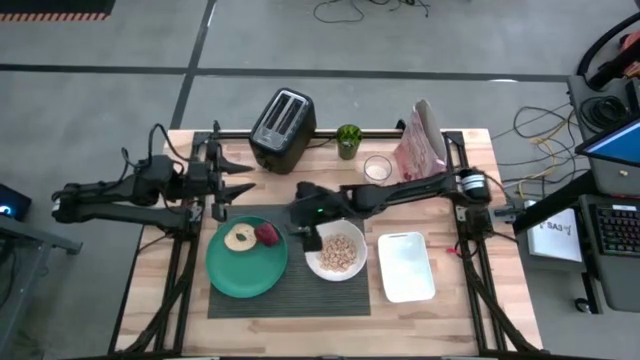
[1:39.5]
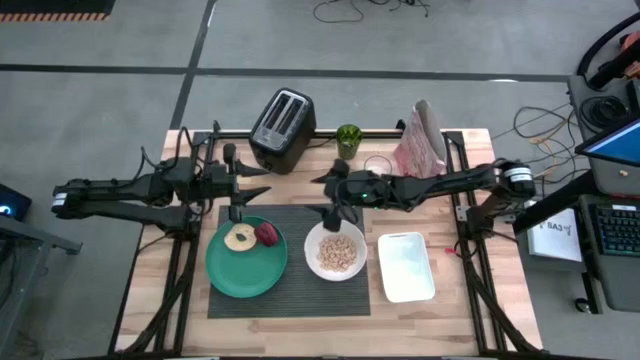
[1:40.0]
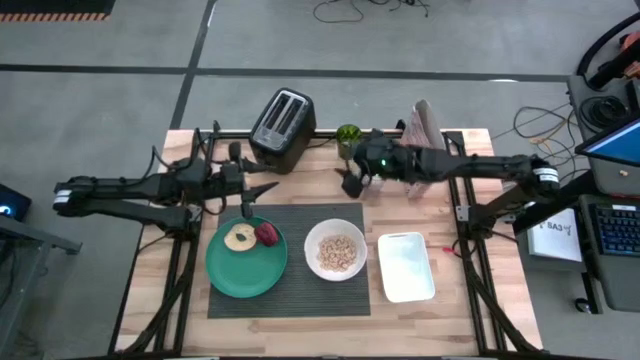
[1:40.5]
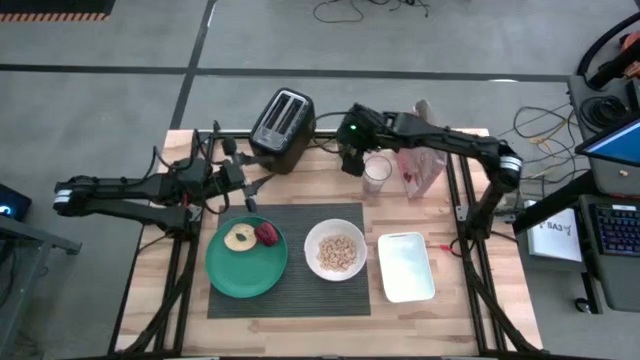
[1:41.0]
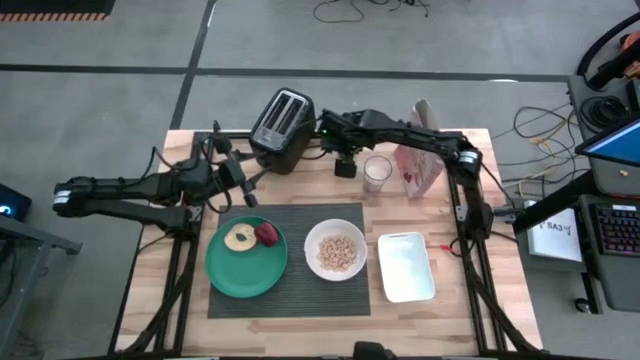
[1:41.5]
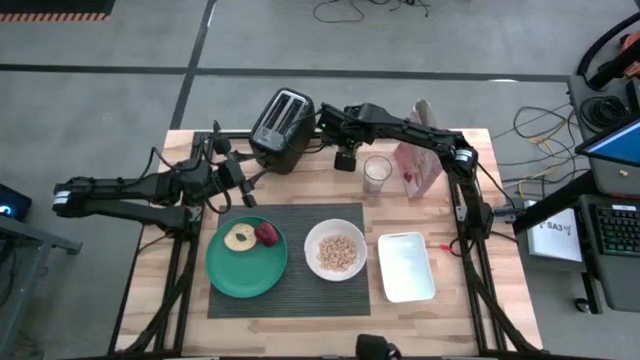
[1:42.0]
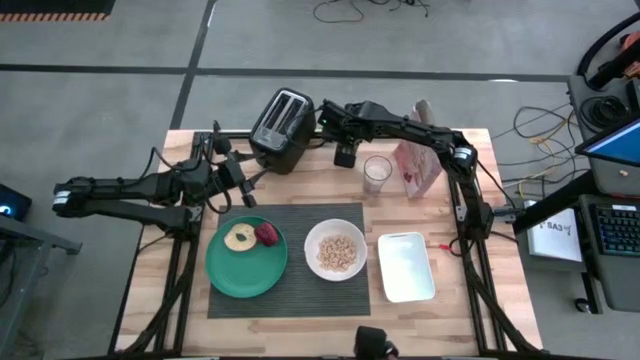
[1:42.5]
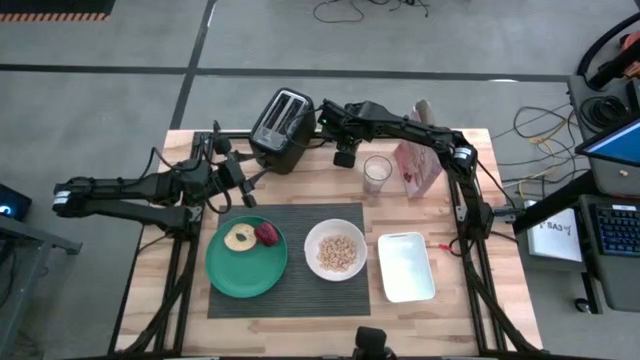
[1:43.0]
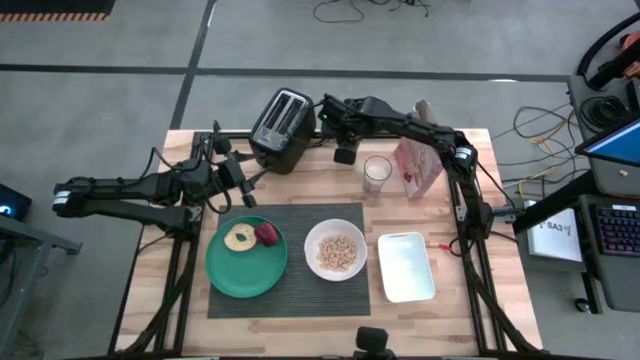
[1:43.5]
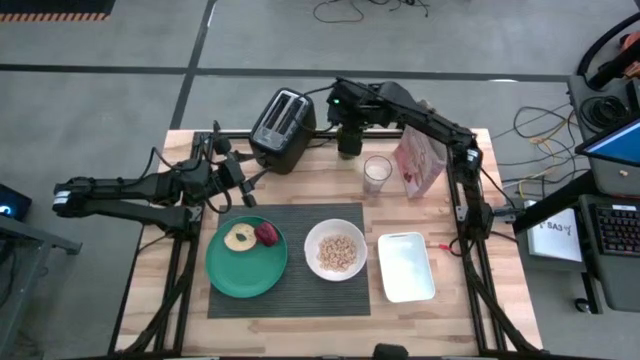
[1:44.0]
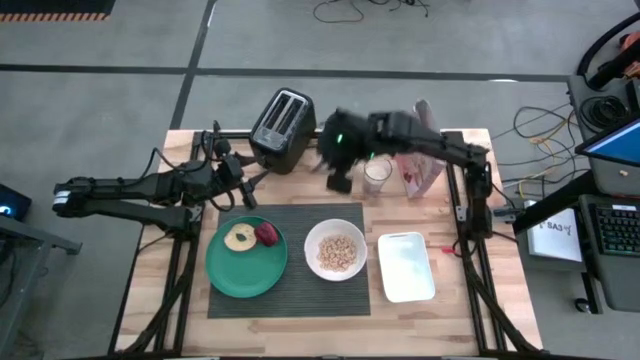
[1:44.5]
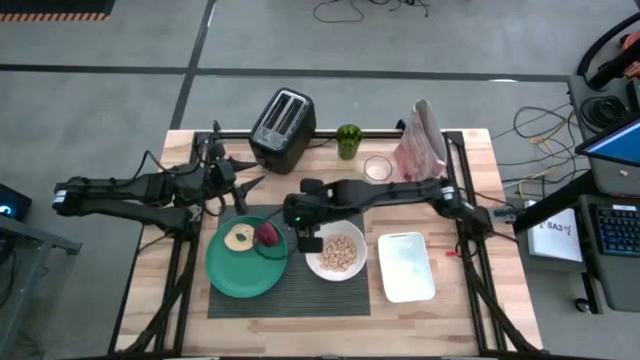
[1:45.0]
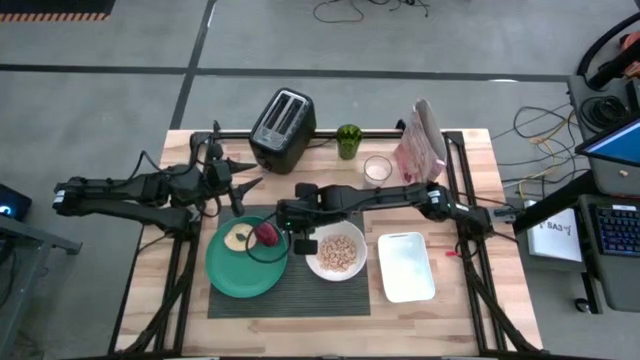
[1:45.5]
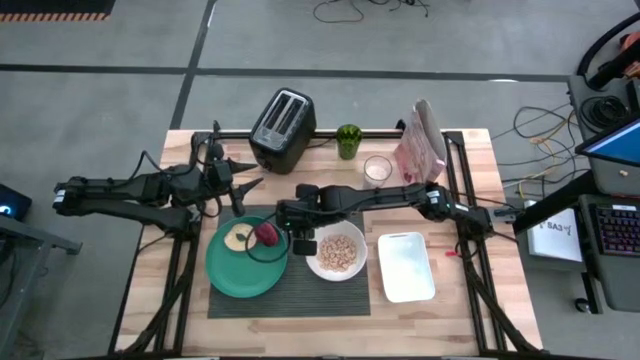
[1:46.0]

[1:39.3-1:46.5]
Task: Arrange a breakfast setting
Put the spoon on the tablemat to the right of the green plate

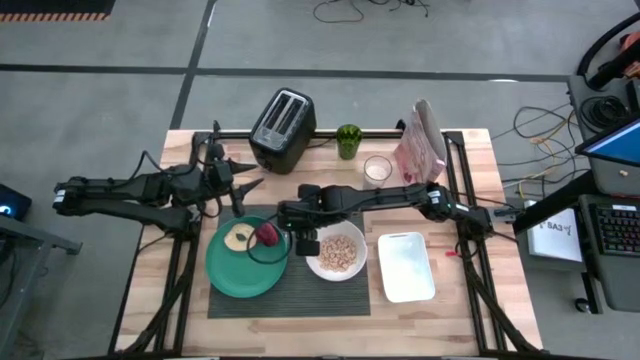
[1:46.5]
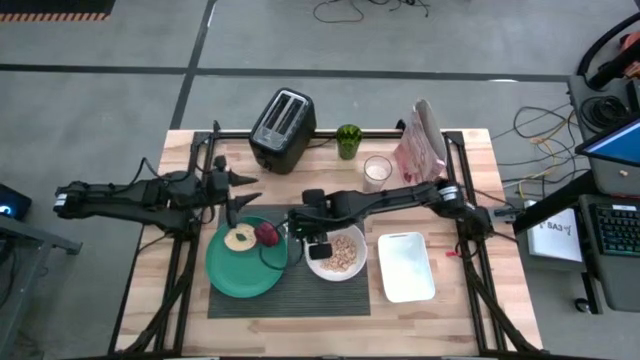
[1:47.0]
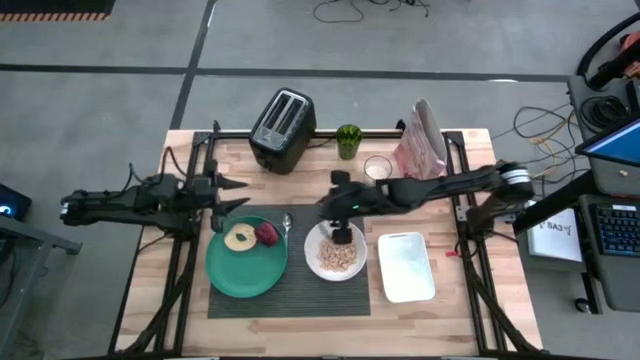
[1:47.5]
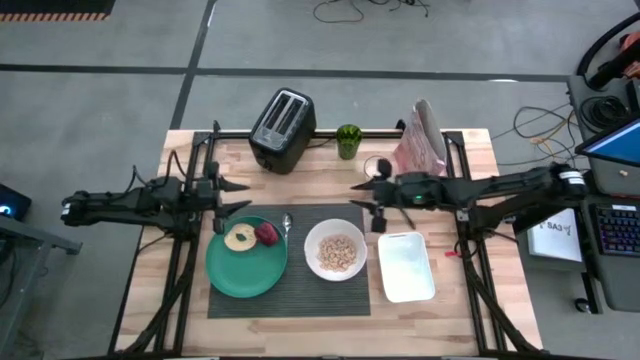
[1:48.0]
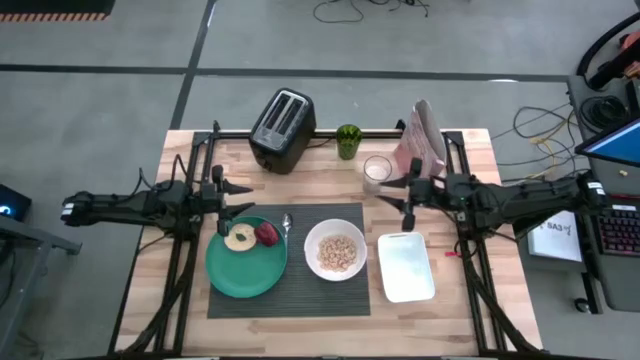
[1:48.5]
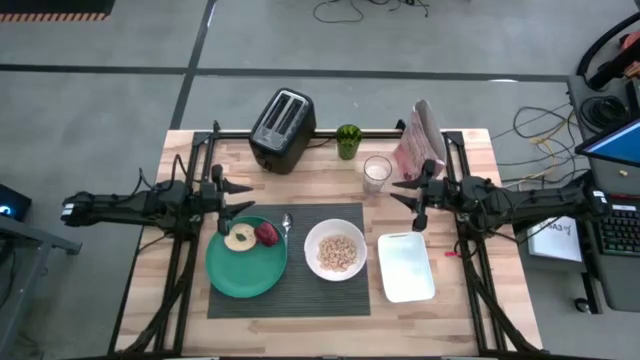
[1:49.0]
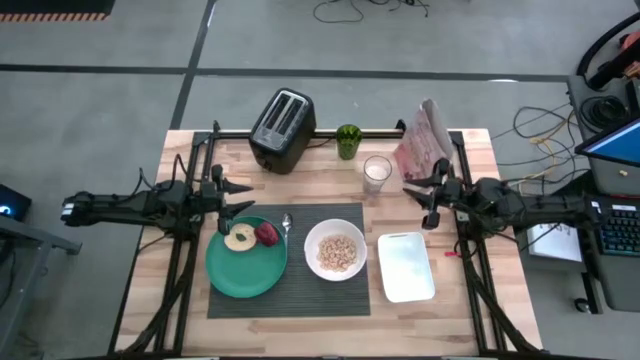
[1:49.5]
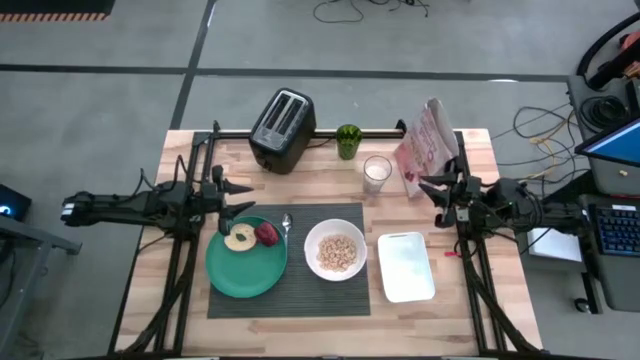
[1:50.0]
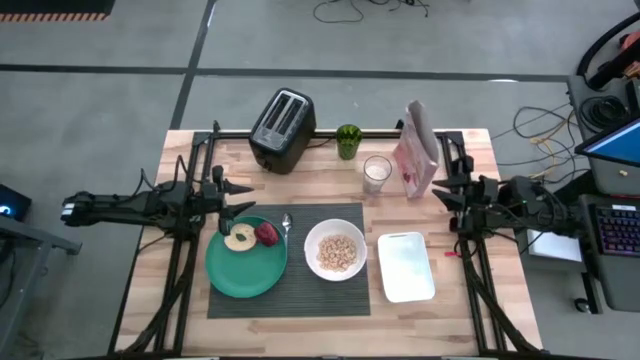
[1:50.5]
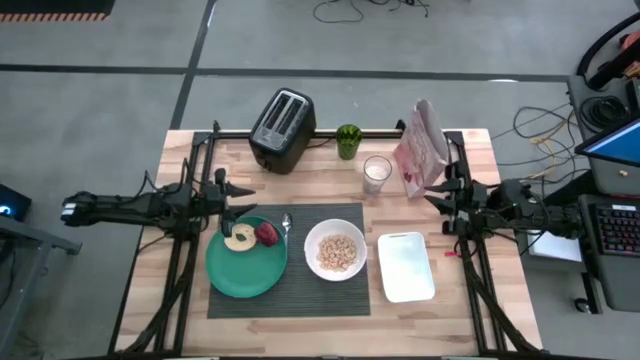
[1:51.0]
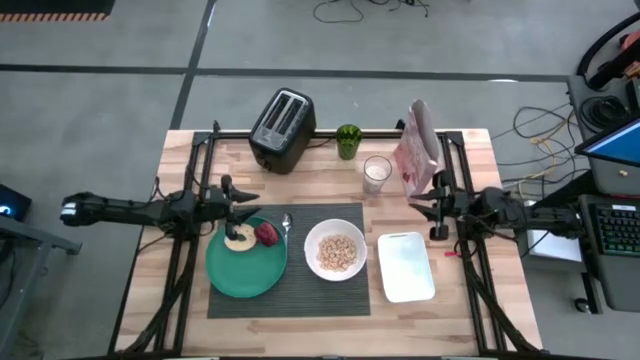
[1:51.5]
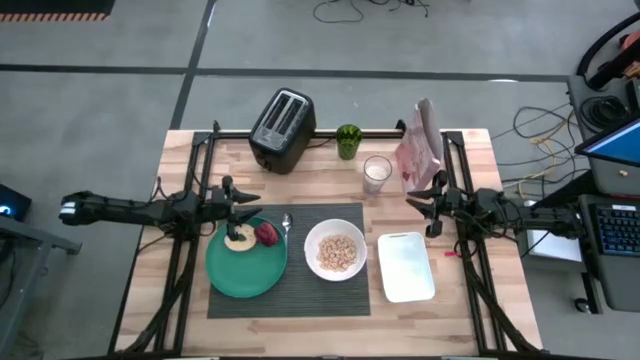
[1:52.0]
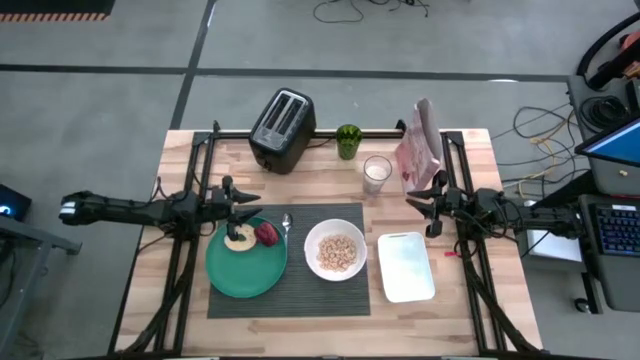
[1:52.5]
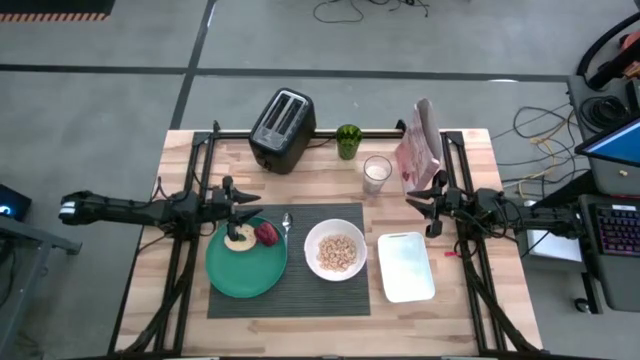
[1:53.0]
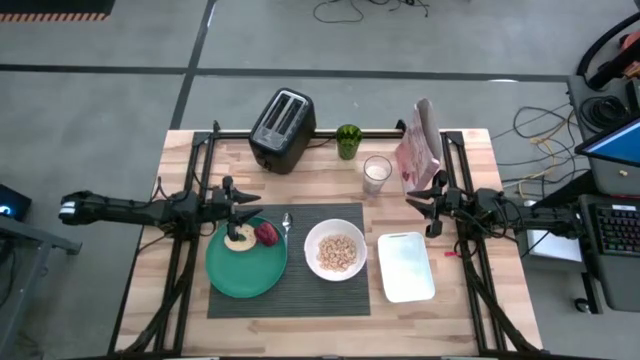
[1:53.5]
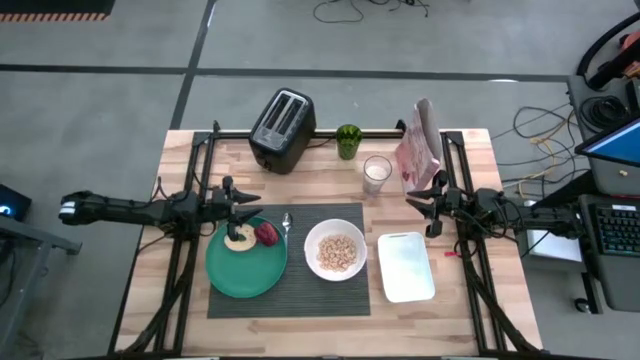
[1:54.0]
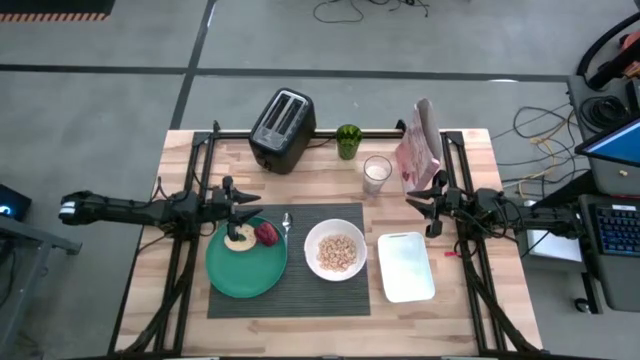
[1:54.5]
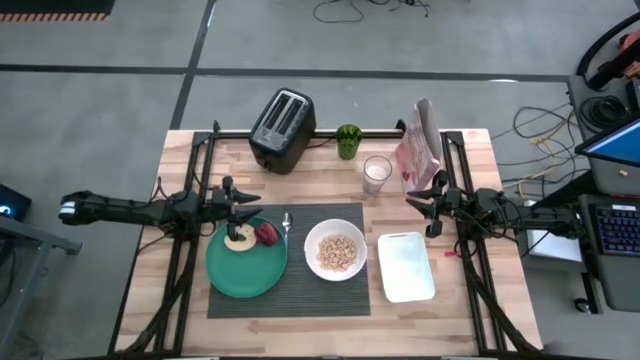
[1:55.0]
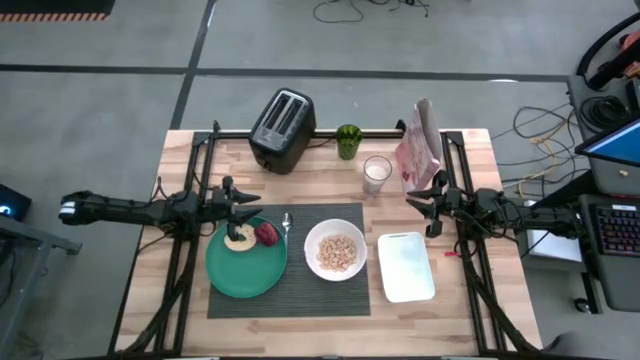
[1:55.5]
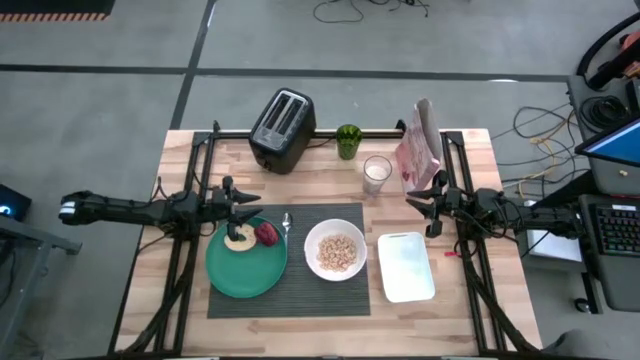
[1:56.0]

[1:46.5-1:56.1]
Return to Home Position

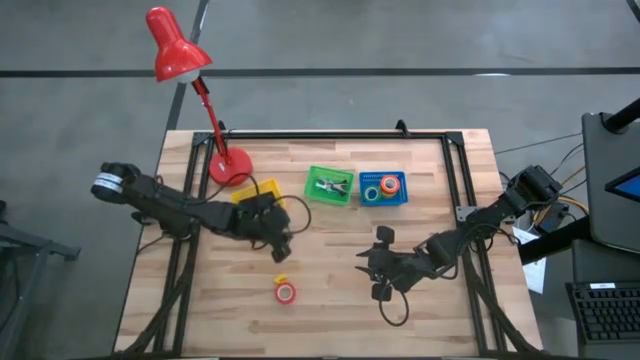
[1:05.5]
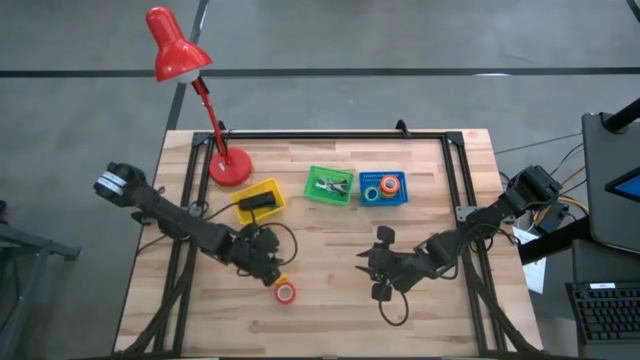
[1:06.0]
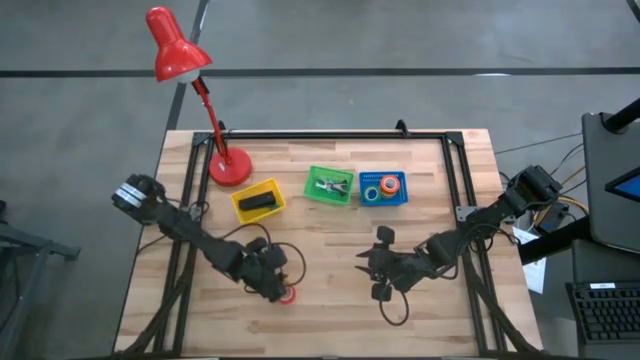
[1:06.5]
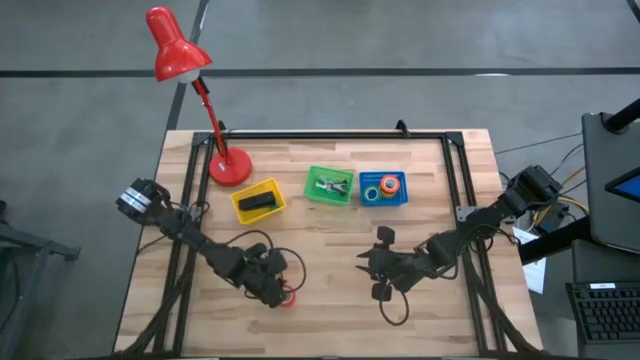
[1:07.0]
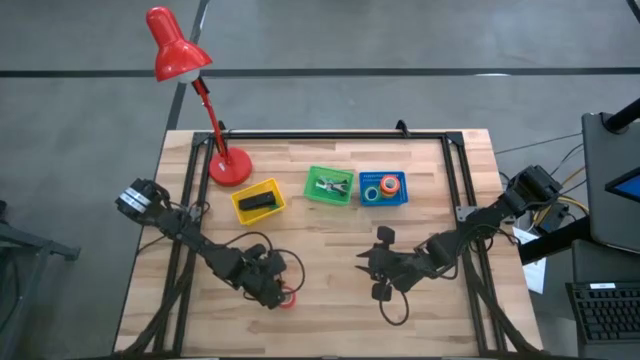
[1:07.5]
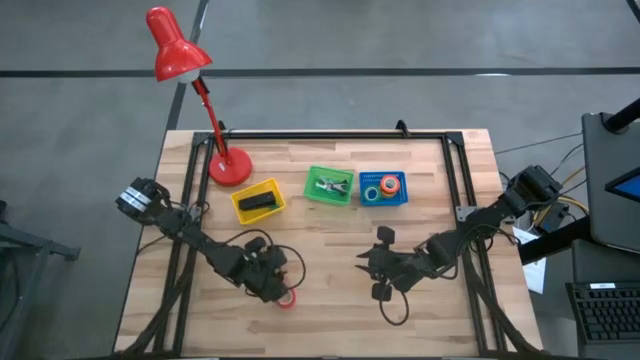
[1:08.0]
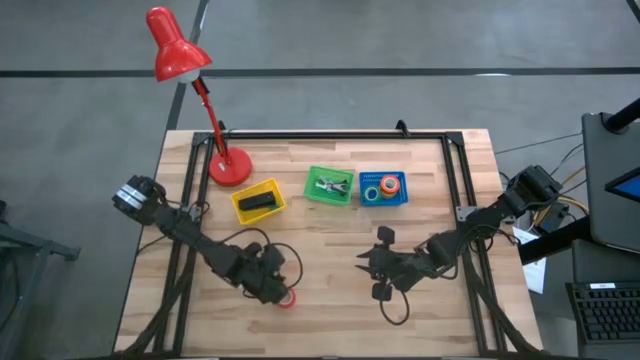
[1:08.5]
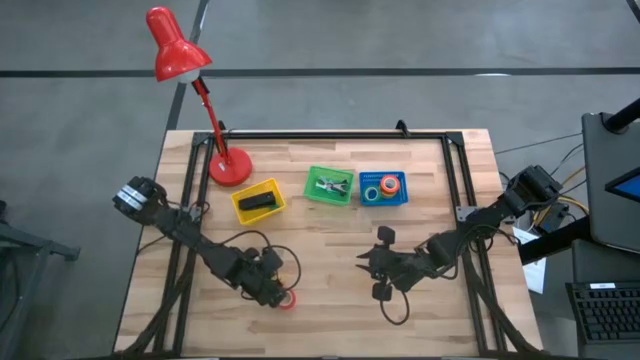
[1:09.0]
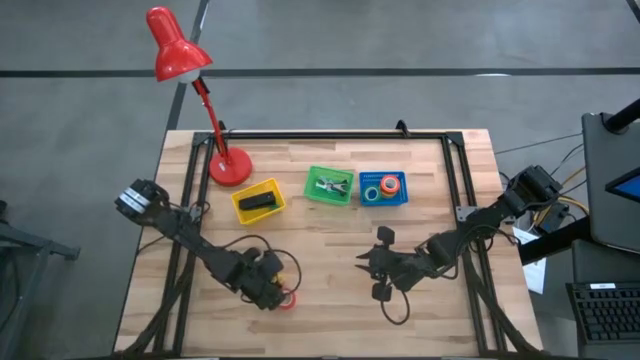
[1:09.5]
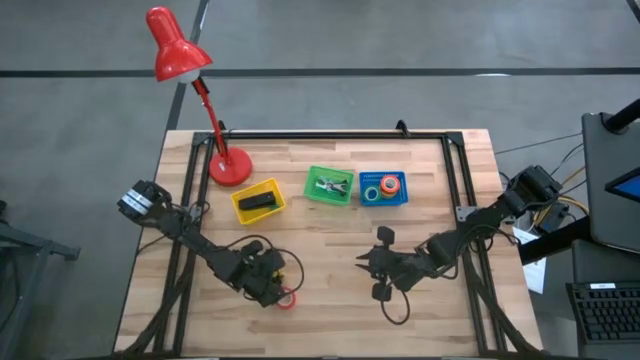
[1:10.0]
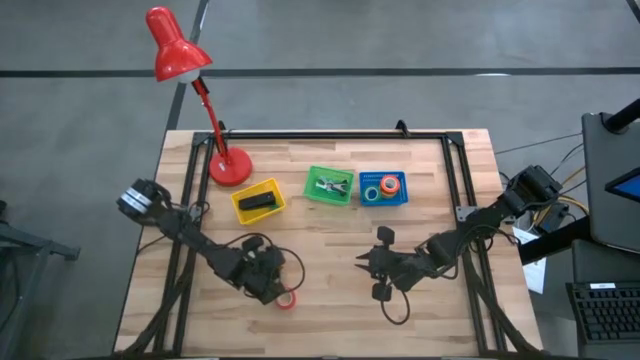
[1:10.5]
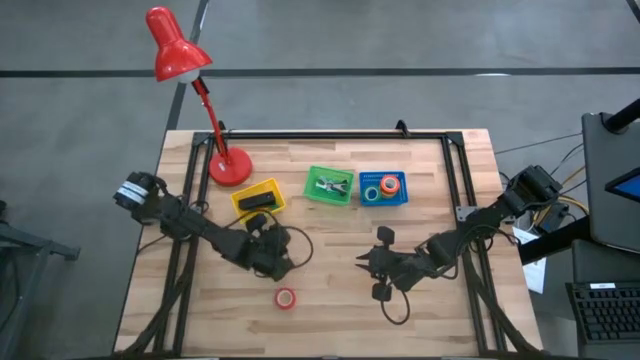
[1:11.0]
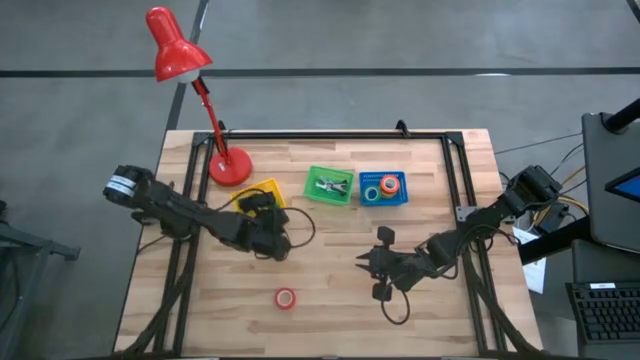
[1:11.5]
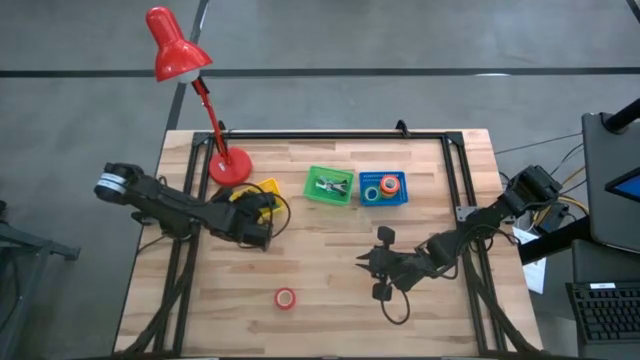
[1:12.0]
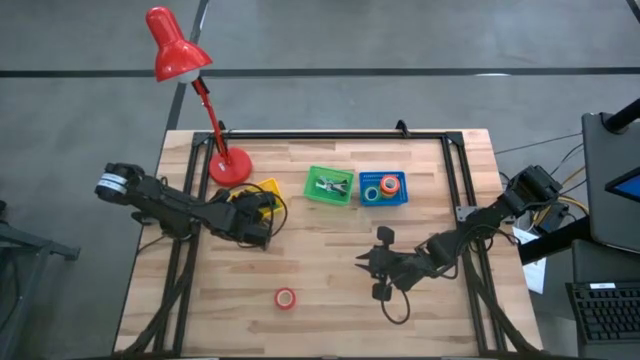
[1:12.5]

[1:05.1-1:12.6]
Task: Pick and place Stapler, Stapler remover, tape
Put the small yellow stapler in the green basket
